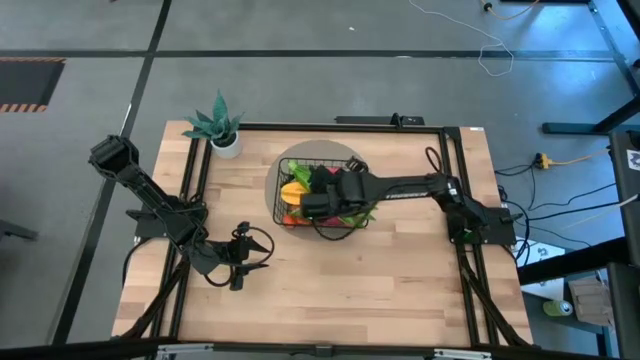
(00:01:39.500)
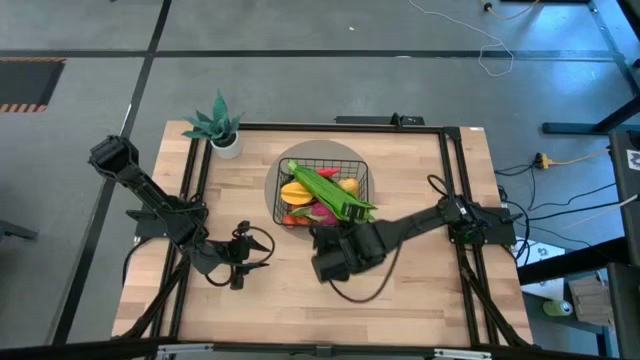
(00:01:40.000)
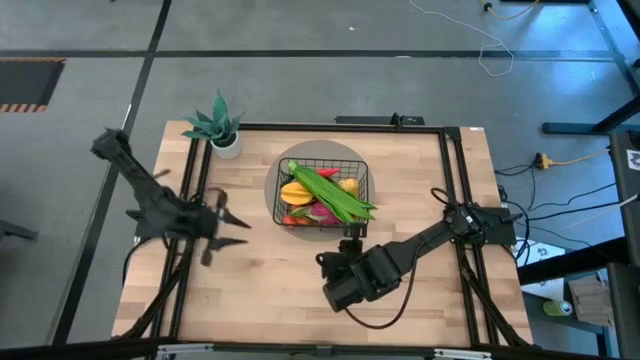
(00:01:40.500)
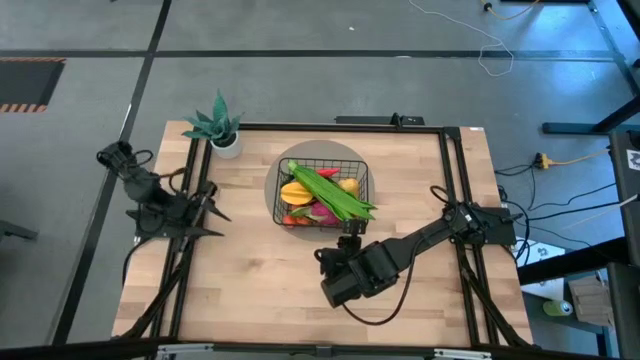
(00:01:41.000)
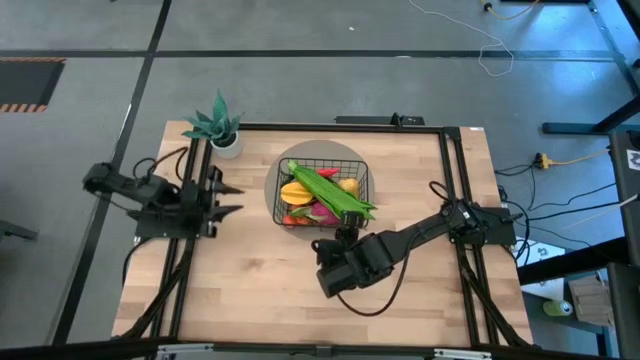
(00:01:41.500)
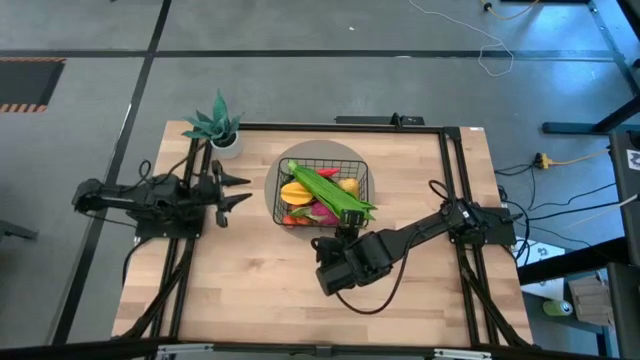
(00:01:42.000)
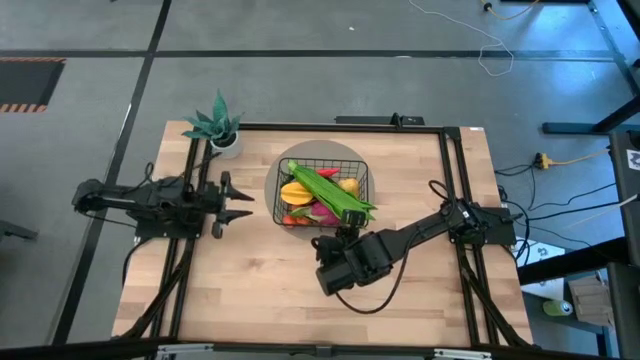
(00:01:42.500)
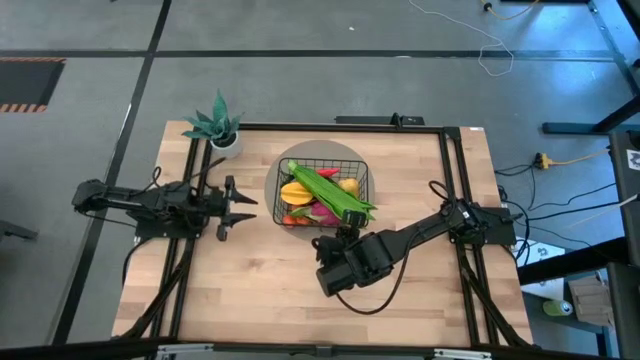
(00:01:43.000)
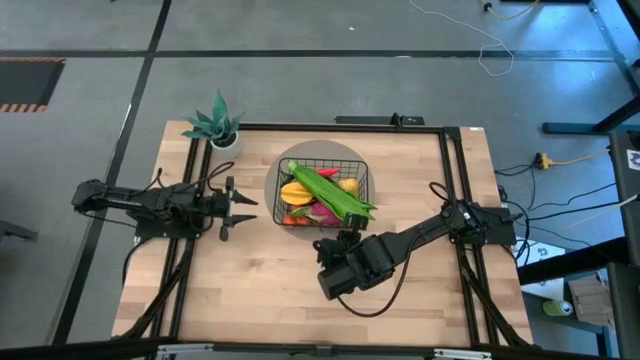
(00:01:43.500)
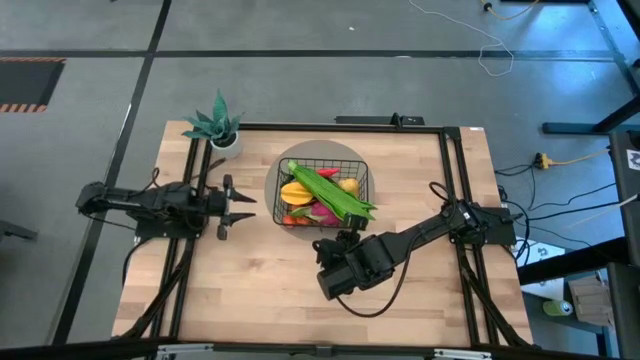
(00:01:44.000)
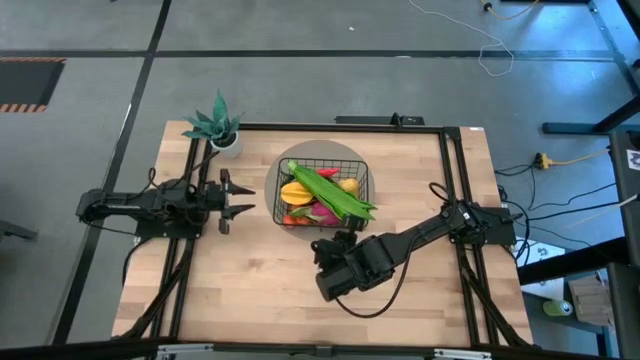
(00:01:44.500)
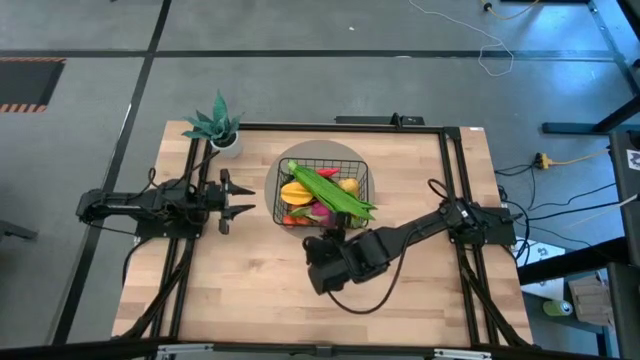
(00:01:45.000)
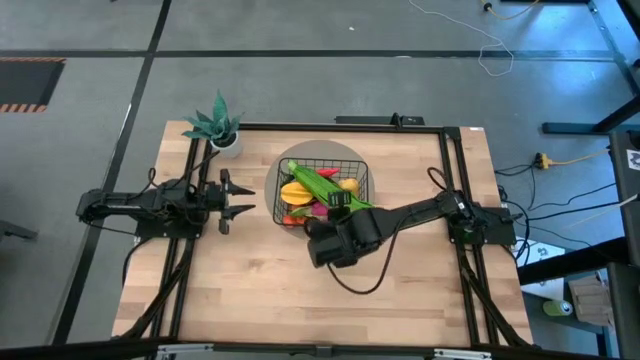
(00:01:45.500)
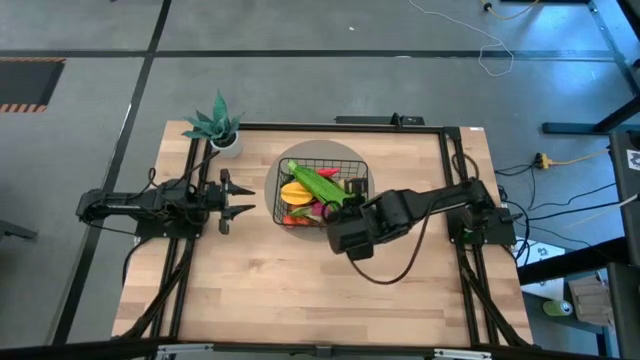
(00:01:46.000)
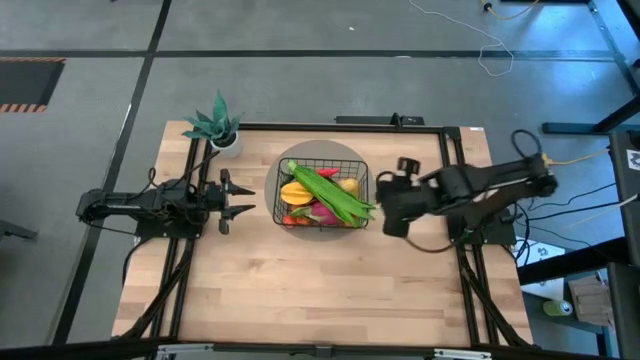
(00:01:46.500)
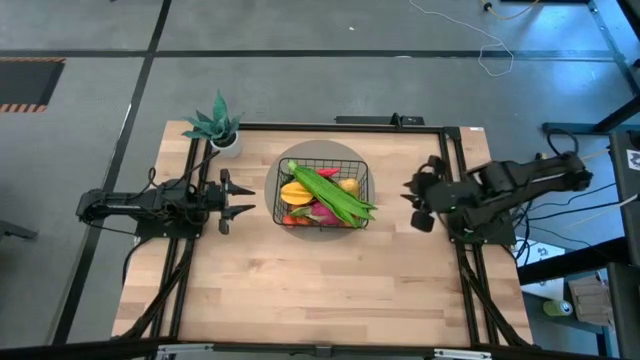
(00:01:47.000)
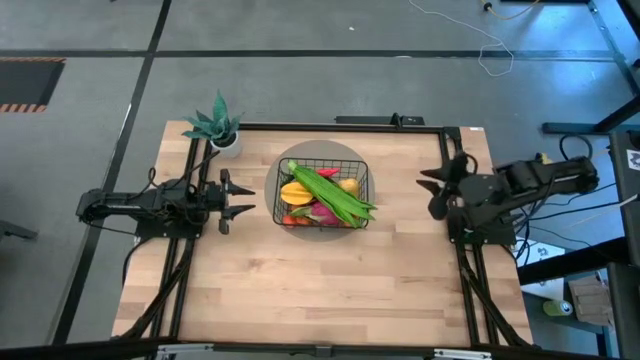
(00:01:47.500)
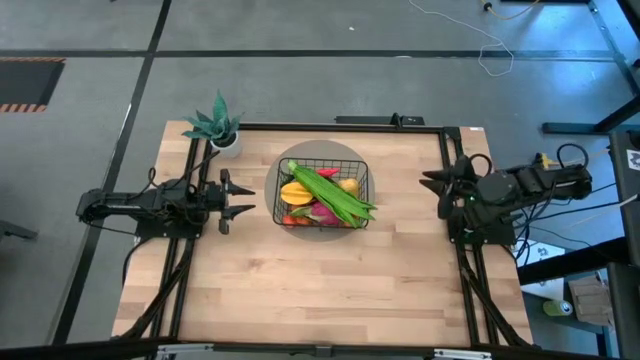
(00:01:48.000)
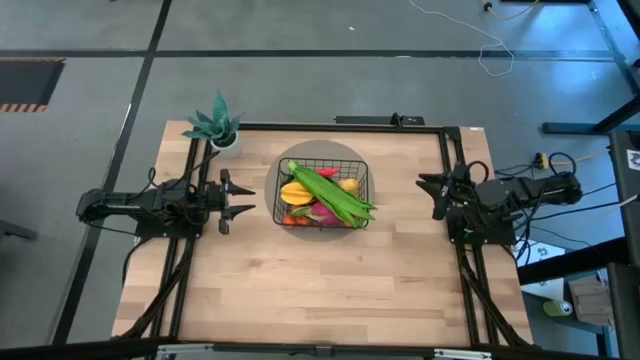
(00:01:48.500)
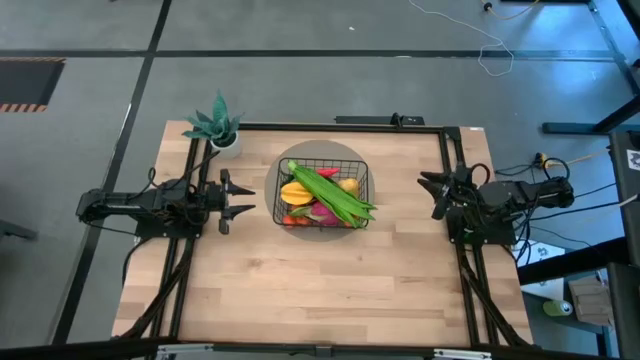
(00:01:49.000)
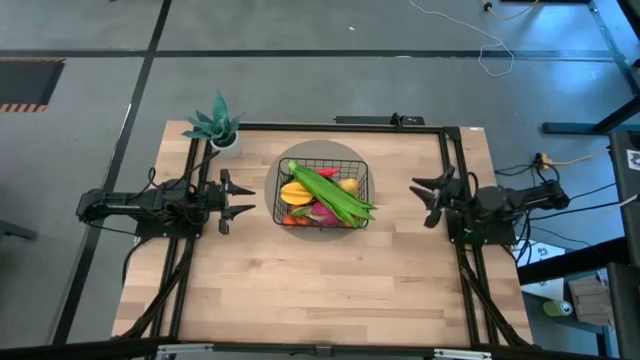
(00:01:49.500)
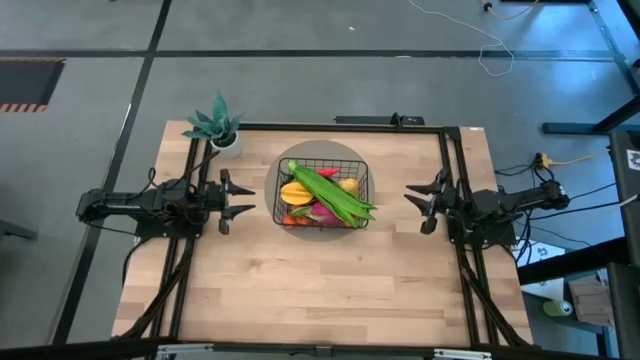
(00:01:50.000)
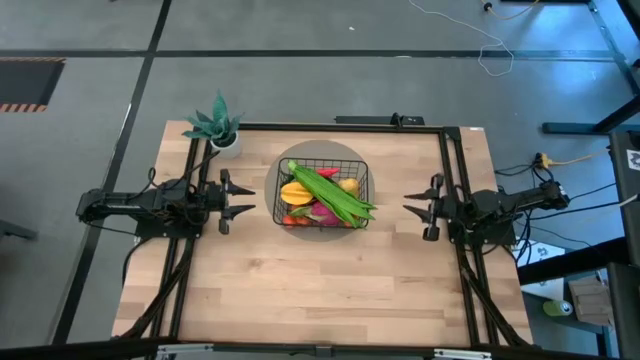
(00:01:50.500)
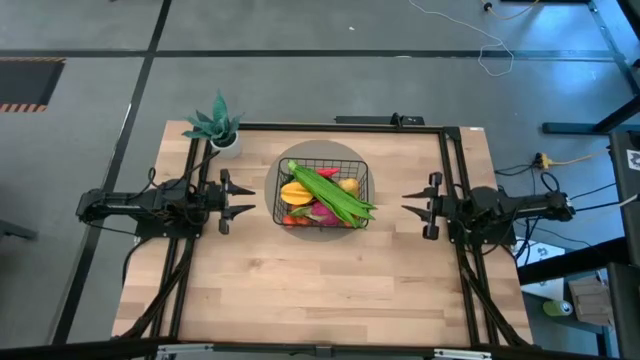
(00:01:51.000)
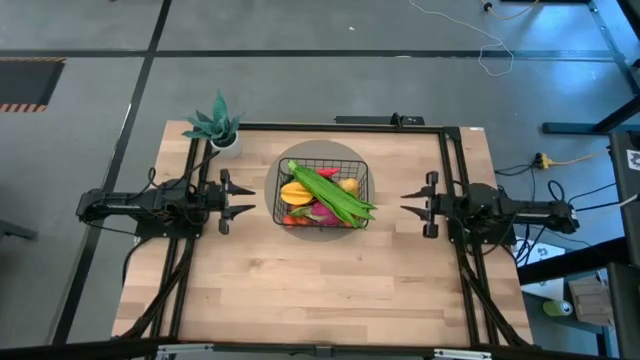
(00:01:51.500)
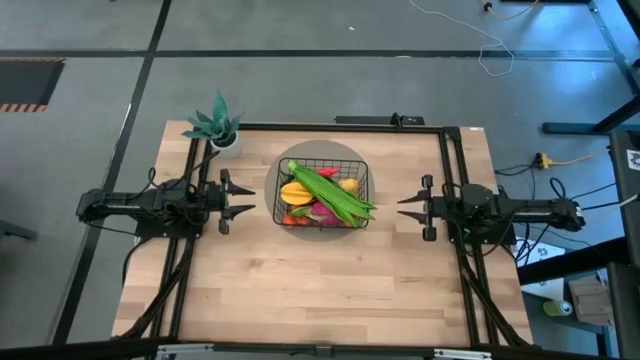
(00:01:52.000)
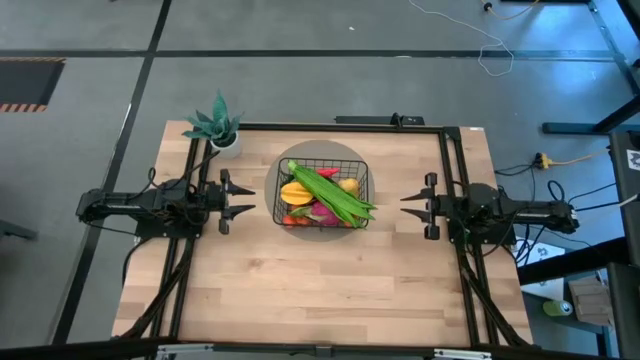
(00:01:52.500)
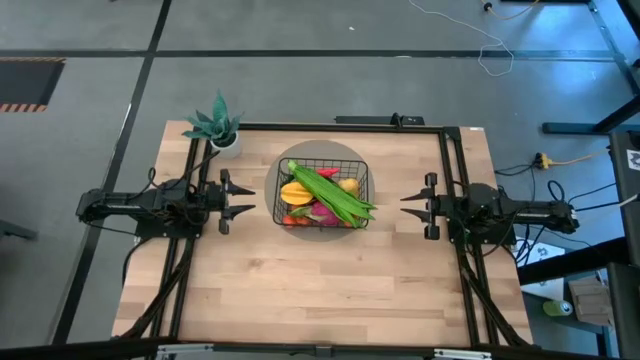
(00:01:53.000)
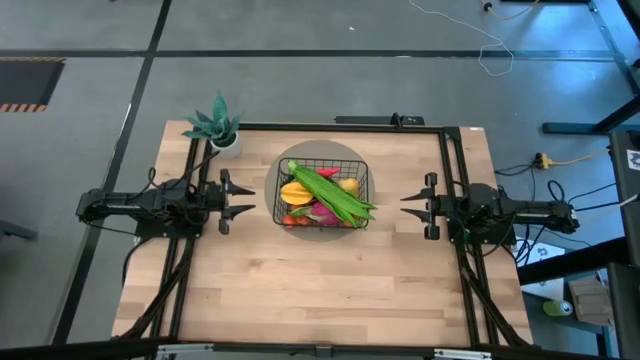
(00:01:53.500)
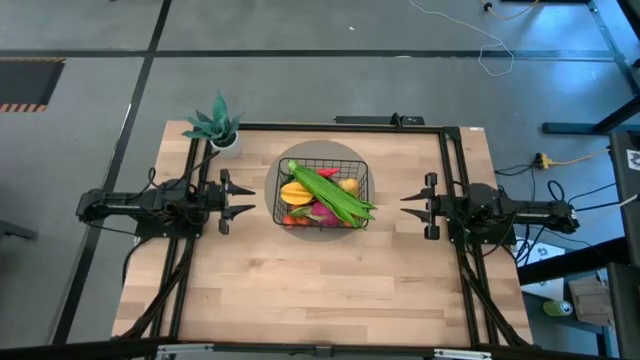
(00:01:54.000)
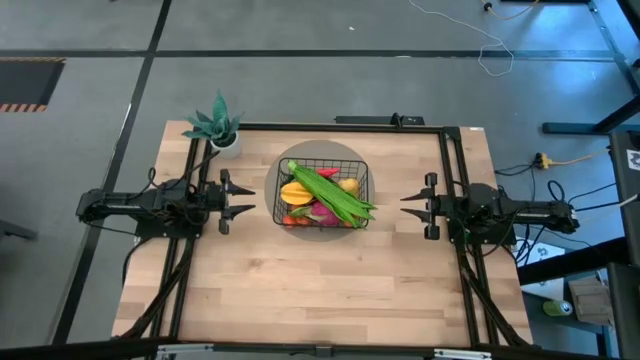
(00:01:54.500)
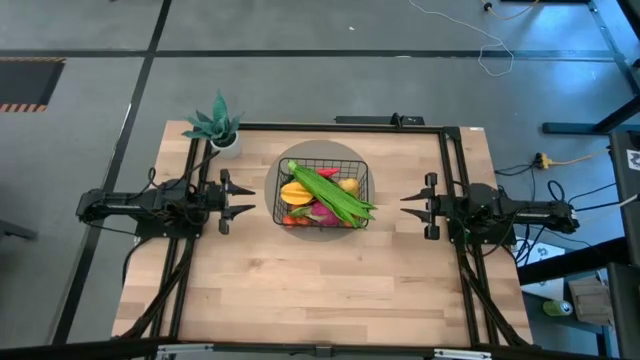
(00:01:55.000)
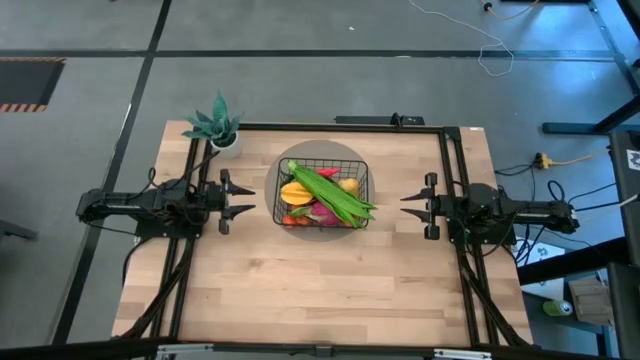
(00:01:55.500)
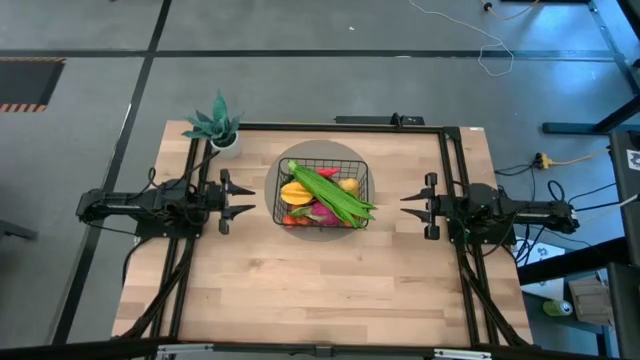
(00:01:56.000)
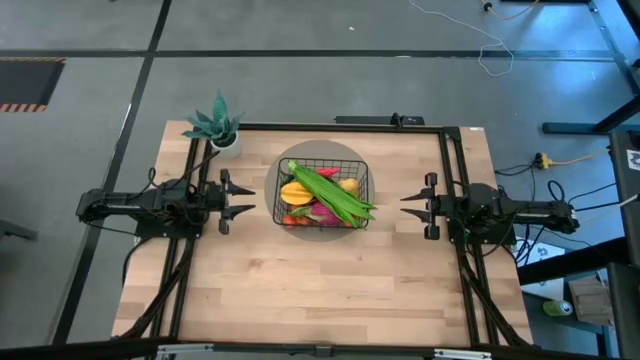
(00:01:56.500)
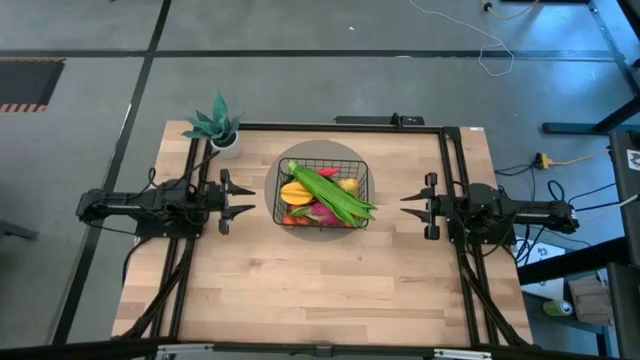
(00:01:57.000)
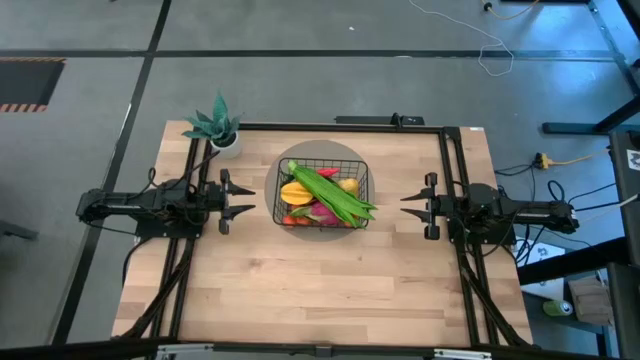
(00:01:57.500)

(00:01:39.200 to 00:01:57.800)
Task: Build produce basket
Return to Home Position

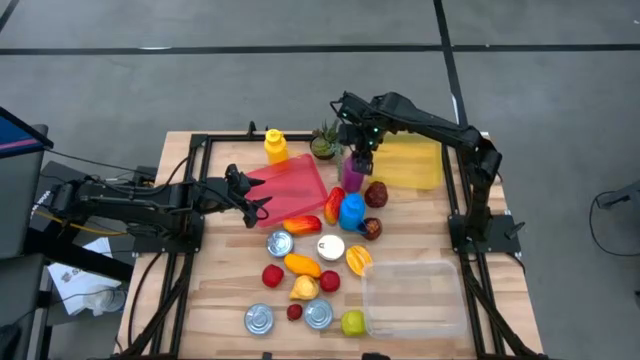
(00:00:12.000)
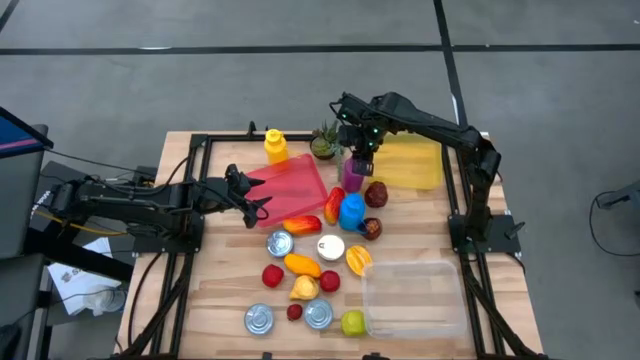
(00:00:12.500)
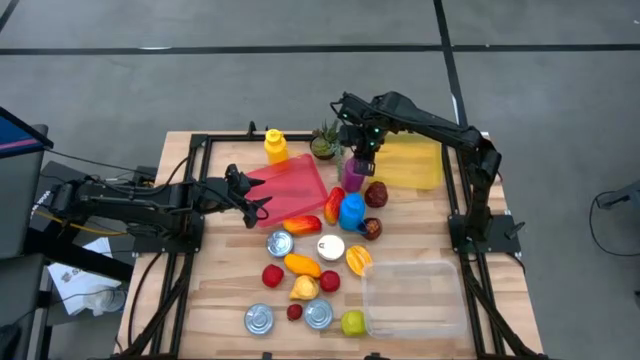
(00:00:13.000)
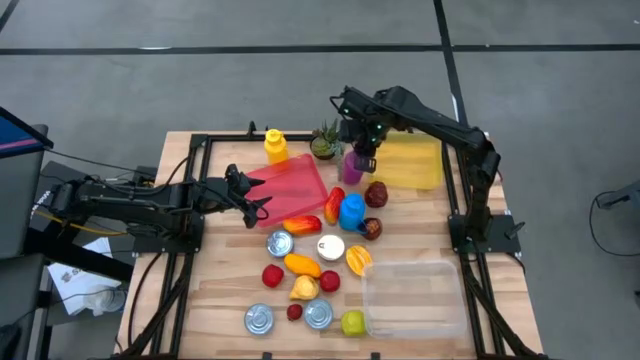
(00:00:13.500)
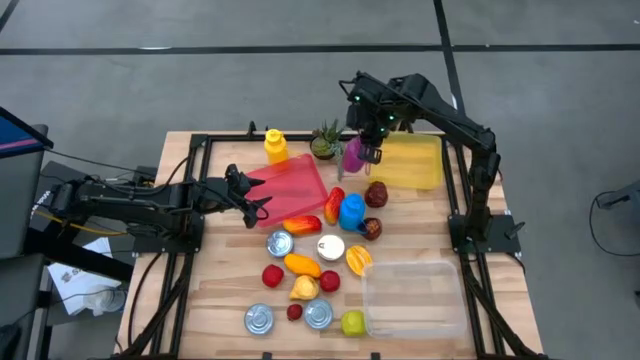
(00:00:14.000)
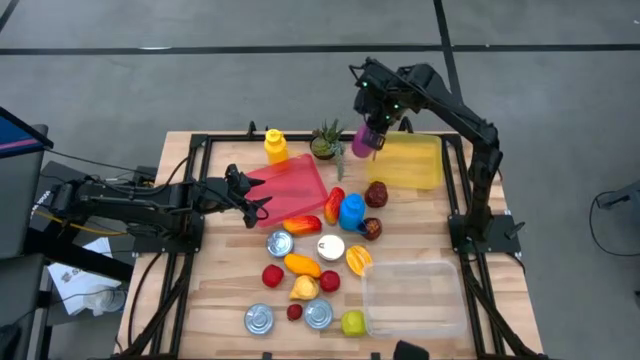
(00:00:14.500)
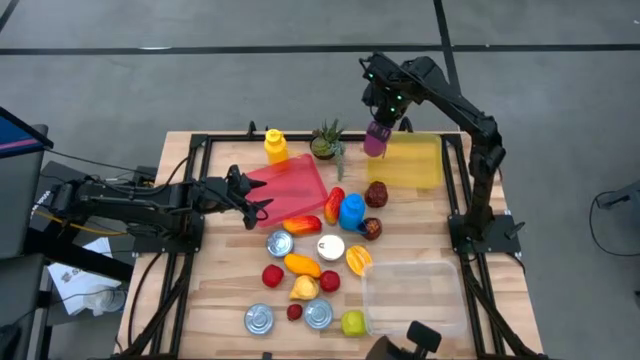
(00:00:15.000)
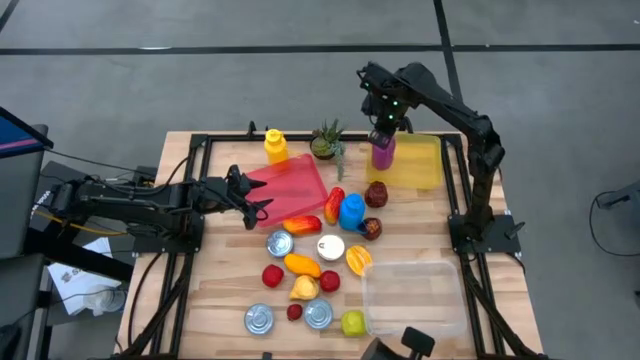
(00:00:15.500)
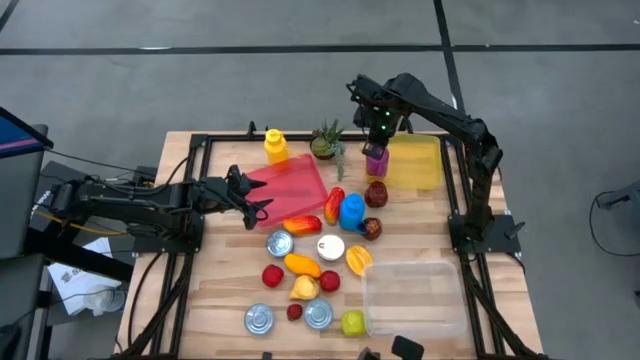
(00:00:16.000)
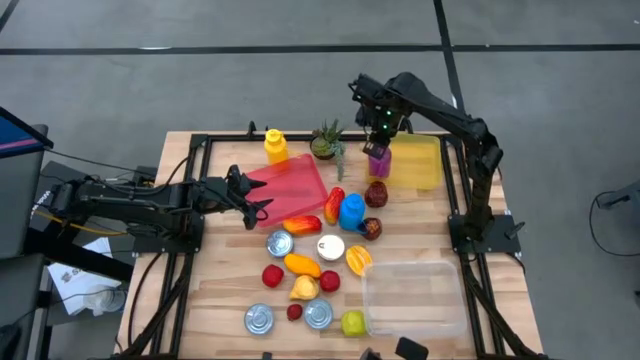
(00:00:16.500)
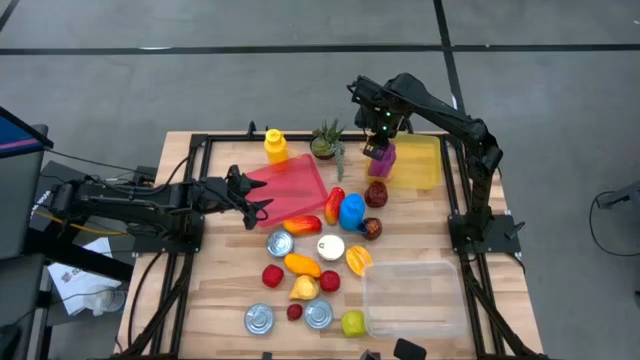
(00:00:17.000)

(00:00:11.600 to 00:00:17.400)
Task: Pick & Place Food Item
Put the purple water bottle into the yellow bin
